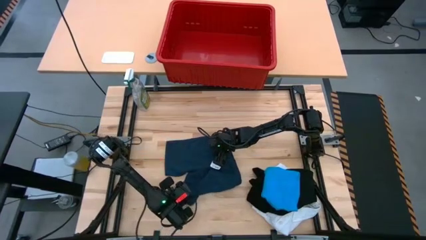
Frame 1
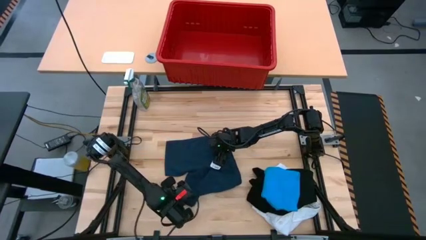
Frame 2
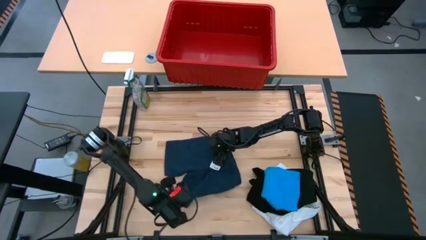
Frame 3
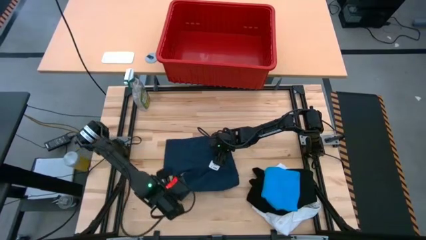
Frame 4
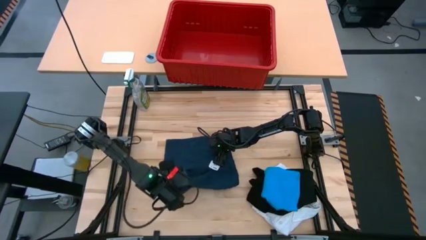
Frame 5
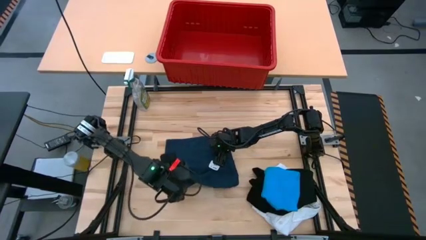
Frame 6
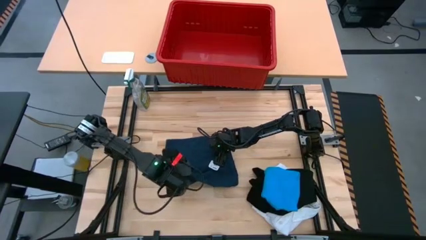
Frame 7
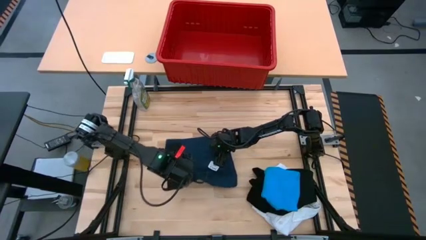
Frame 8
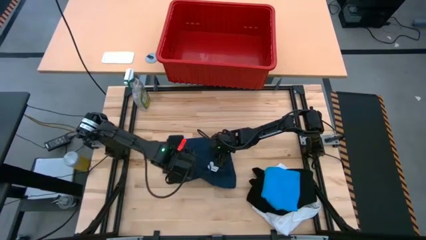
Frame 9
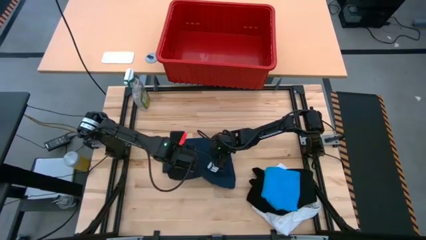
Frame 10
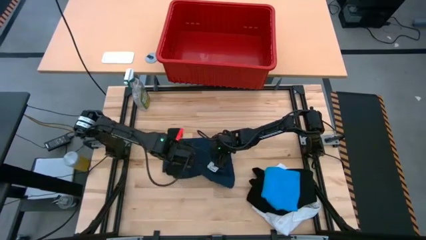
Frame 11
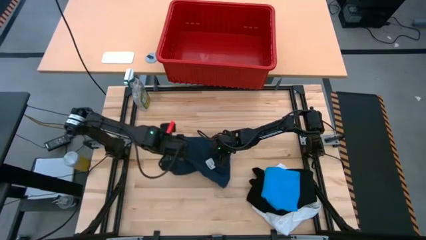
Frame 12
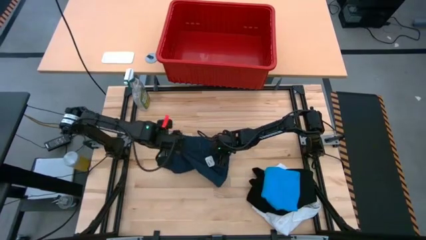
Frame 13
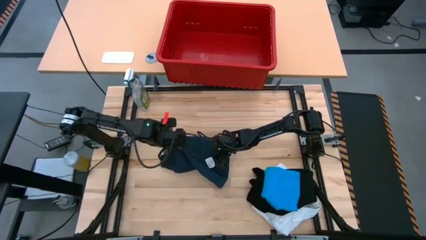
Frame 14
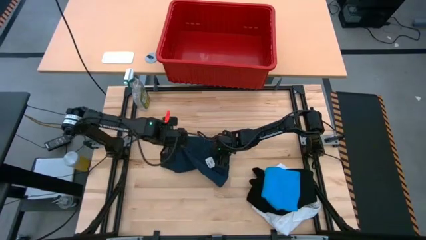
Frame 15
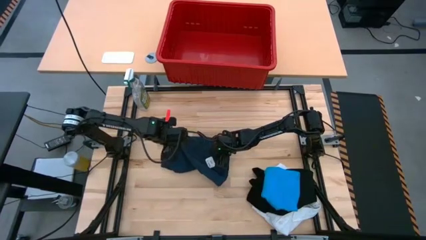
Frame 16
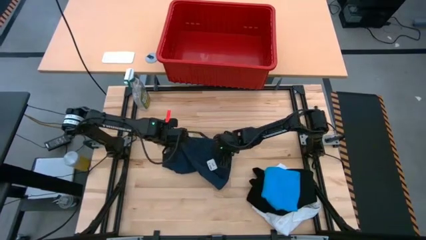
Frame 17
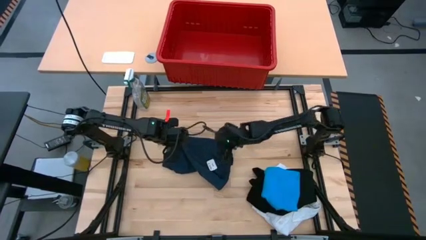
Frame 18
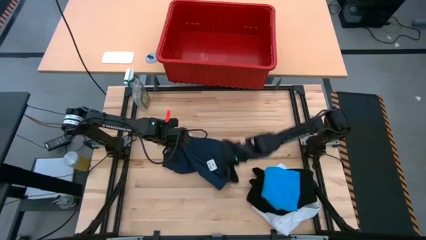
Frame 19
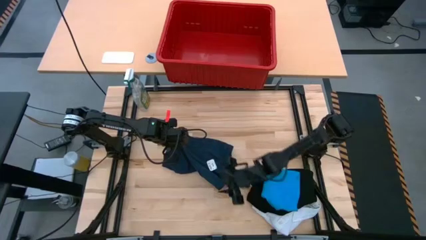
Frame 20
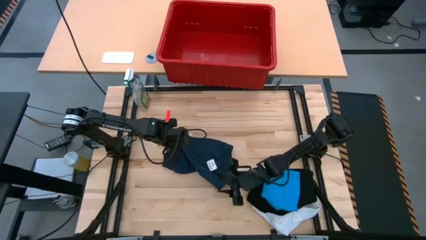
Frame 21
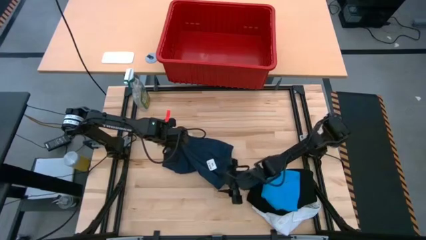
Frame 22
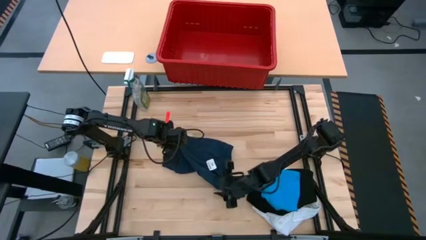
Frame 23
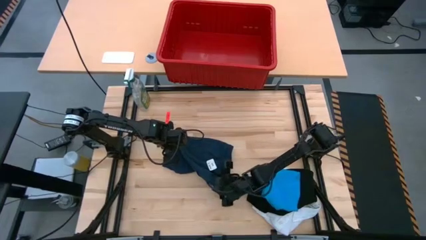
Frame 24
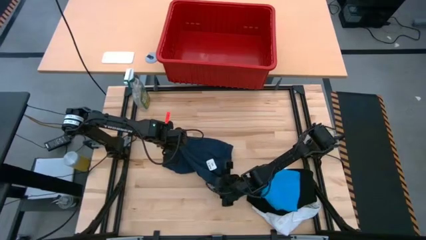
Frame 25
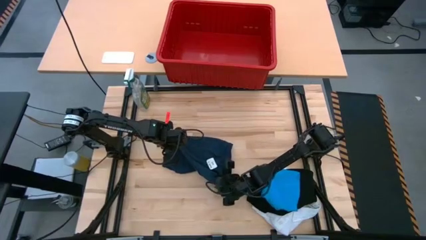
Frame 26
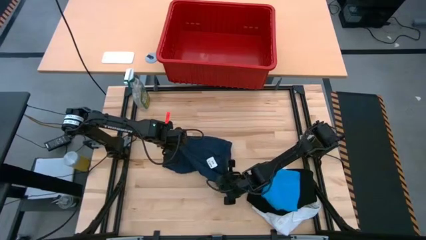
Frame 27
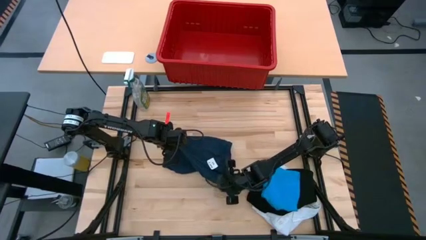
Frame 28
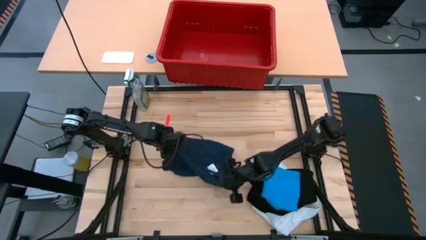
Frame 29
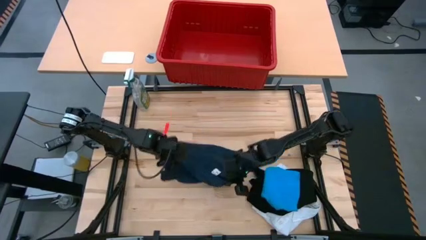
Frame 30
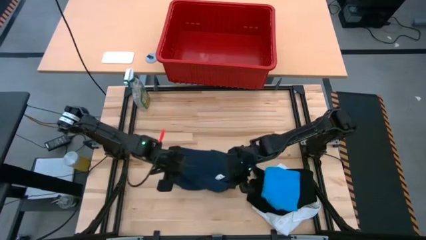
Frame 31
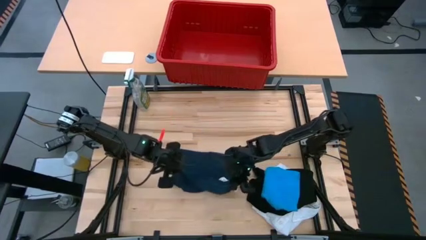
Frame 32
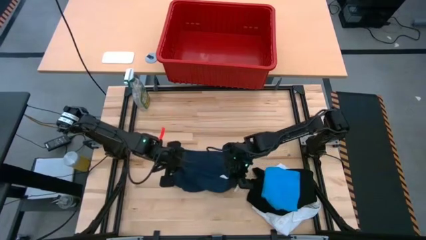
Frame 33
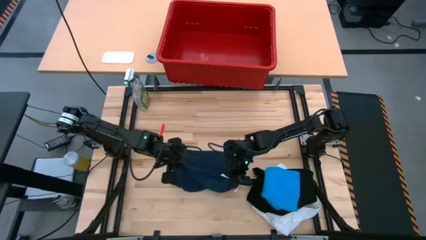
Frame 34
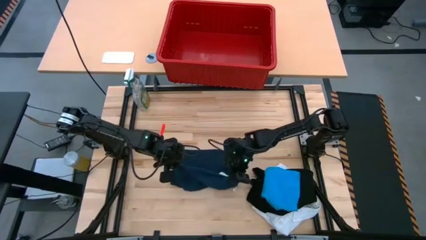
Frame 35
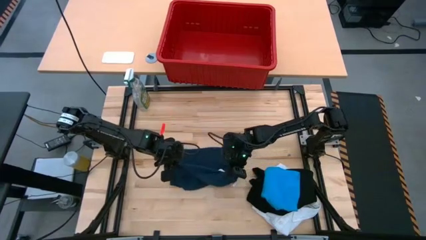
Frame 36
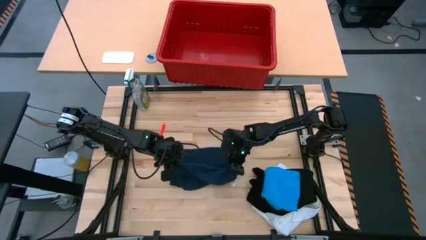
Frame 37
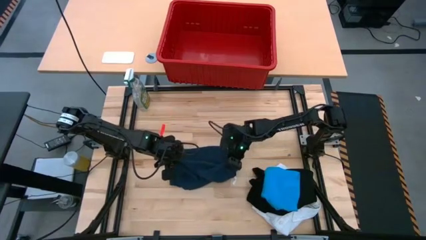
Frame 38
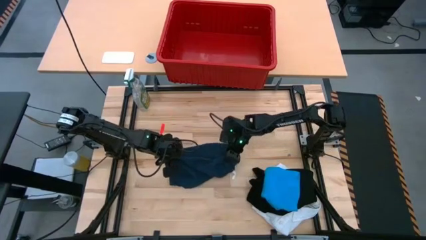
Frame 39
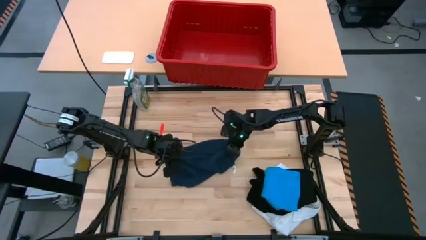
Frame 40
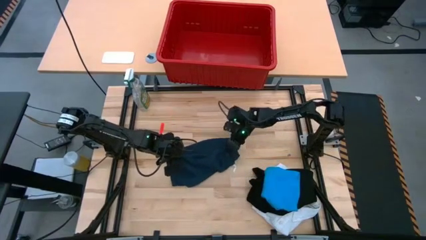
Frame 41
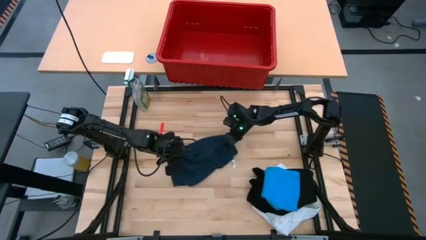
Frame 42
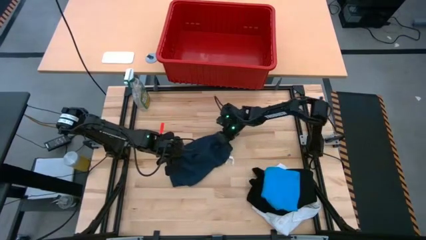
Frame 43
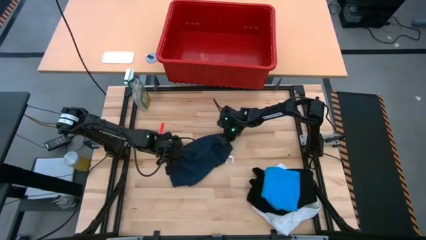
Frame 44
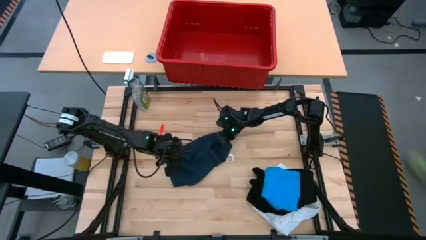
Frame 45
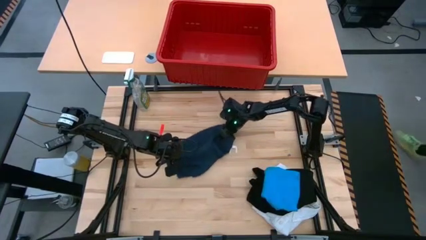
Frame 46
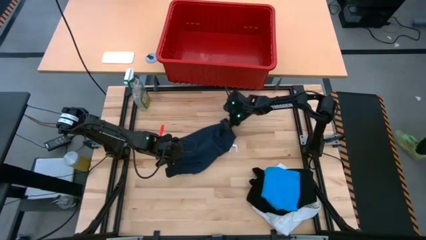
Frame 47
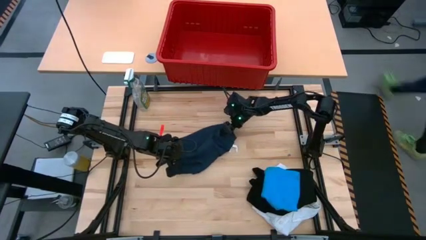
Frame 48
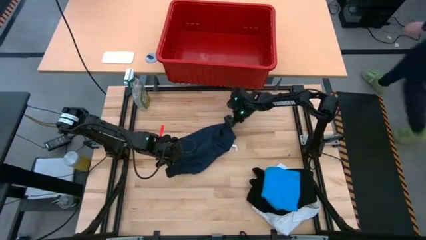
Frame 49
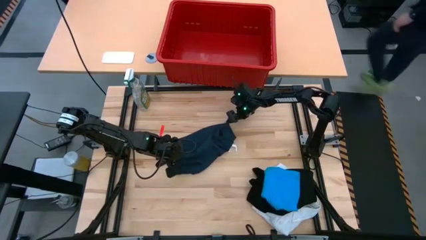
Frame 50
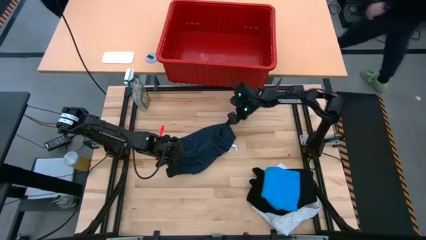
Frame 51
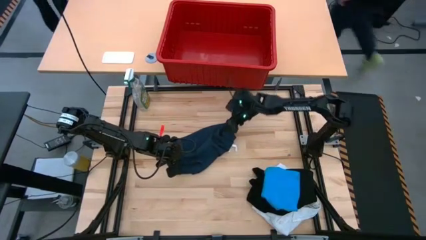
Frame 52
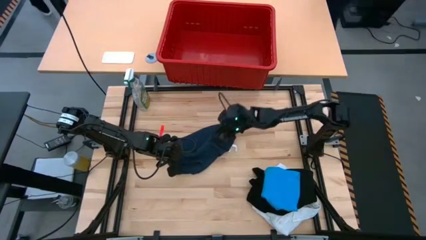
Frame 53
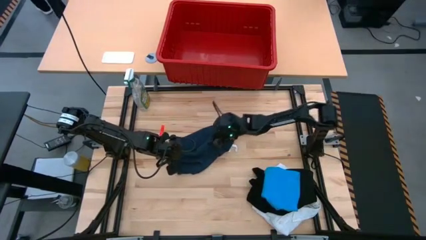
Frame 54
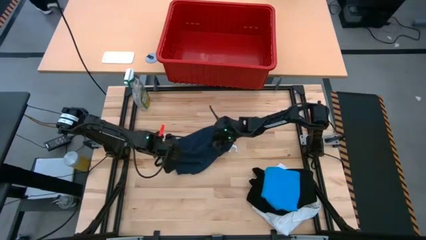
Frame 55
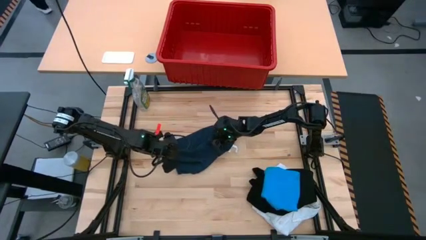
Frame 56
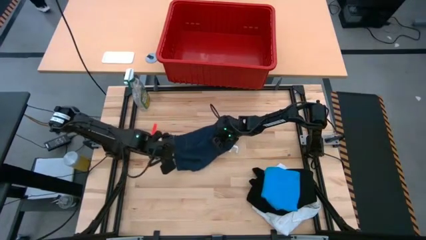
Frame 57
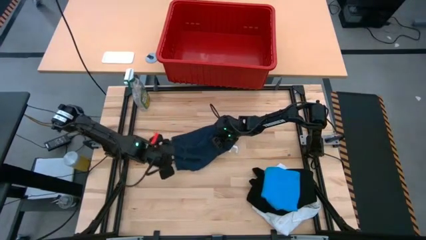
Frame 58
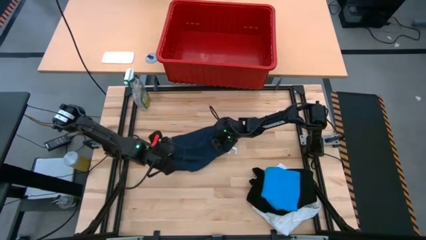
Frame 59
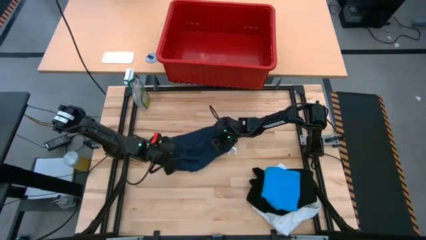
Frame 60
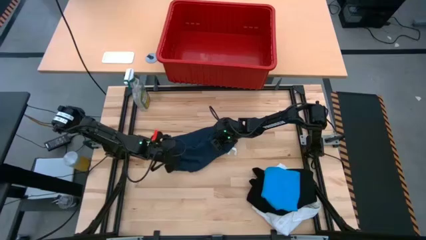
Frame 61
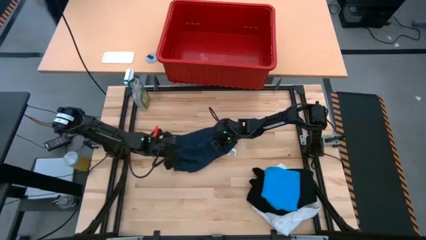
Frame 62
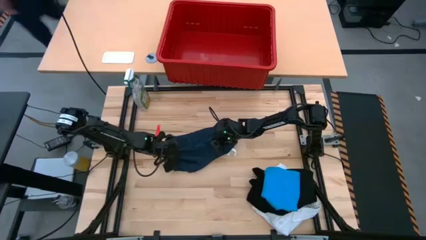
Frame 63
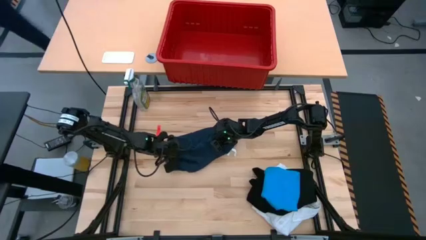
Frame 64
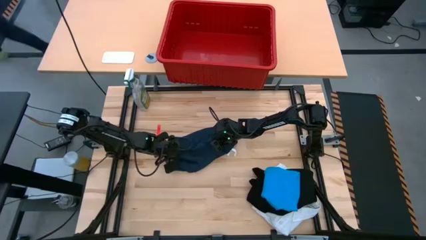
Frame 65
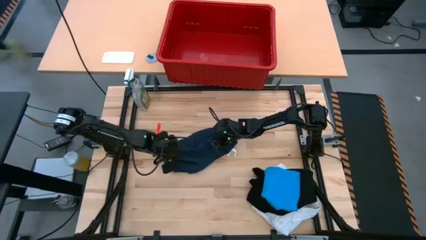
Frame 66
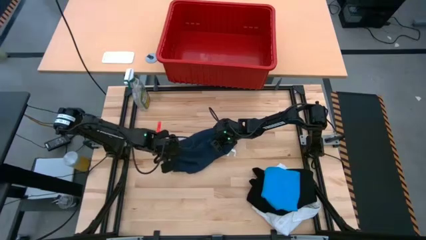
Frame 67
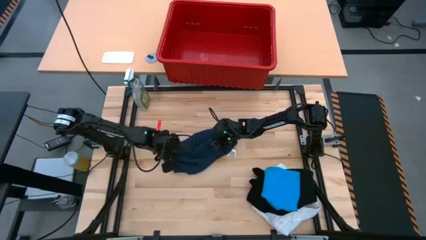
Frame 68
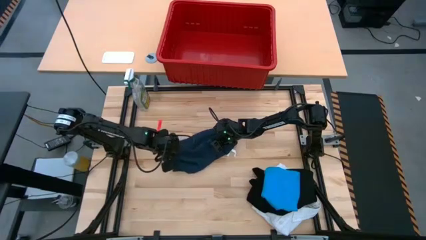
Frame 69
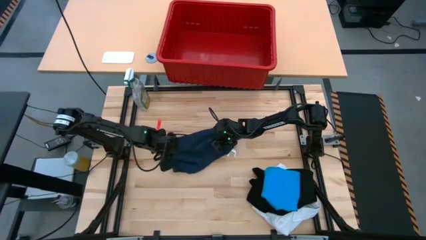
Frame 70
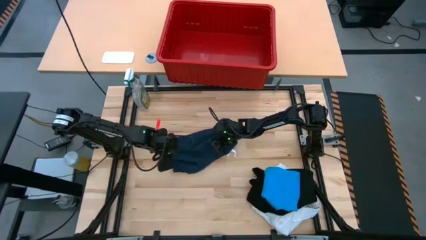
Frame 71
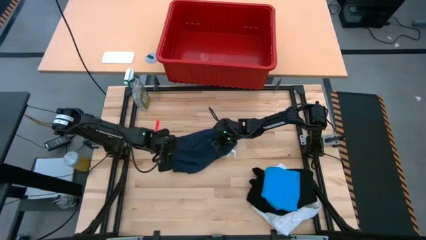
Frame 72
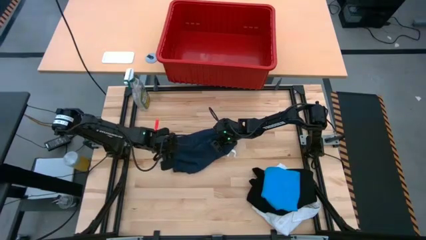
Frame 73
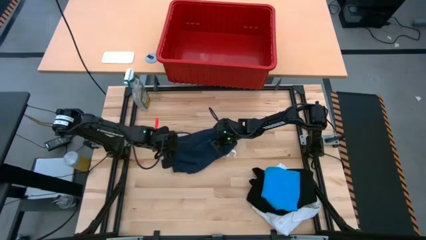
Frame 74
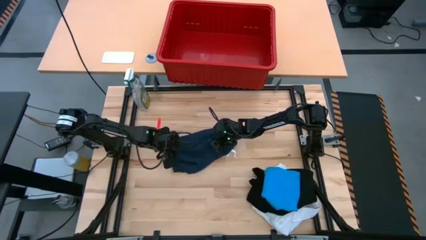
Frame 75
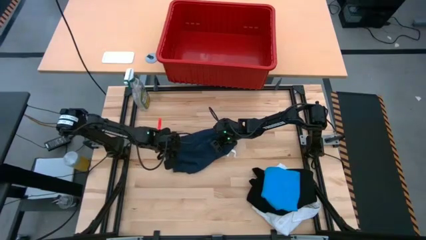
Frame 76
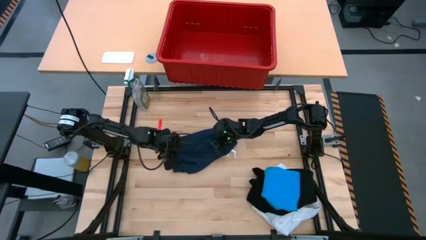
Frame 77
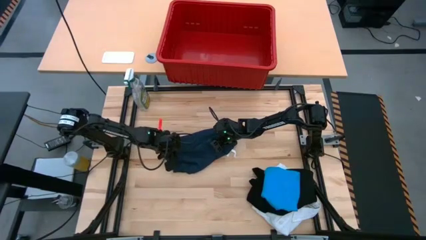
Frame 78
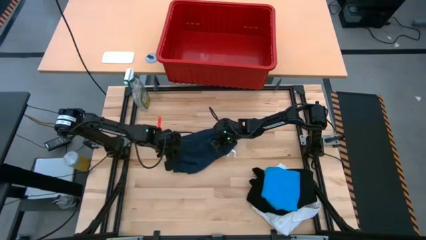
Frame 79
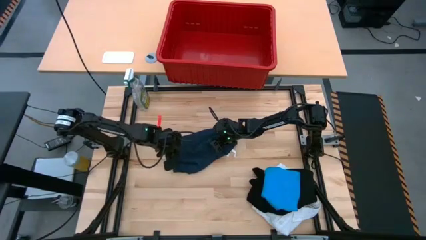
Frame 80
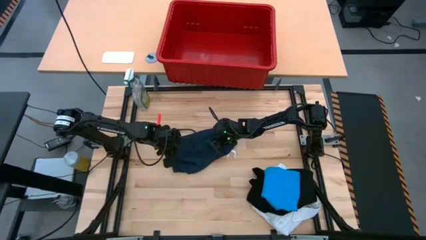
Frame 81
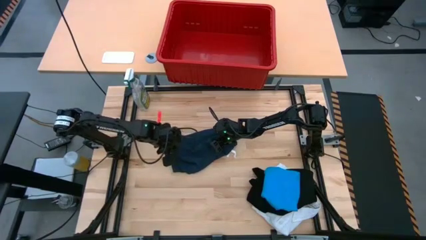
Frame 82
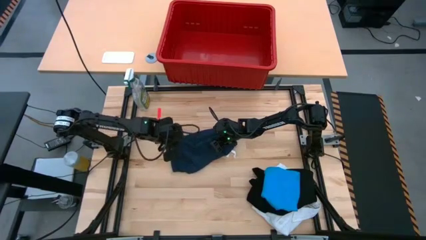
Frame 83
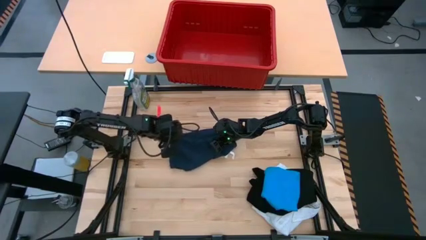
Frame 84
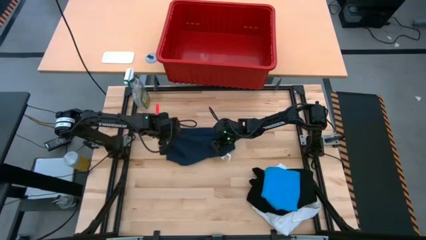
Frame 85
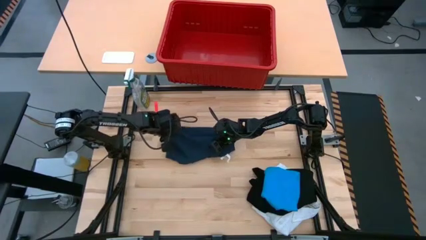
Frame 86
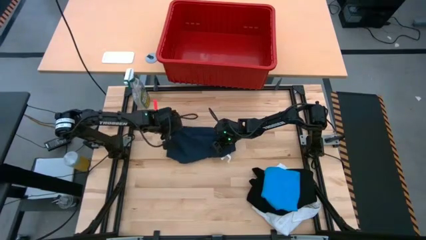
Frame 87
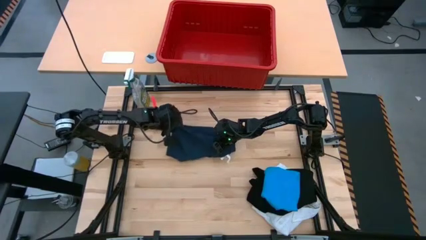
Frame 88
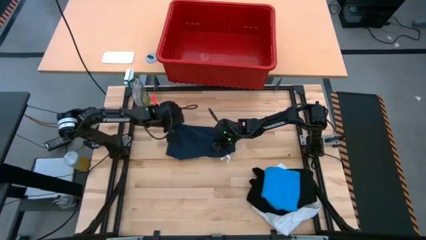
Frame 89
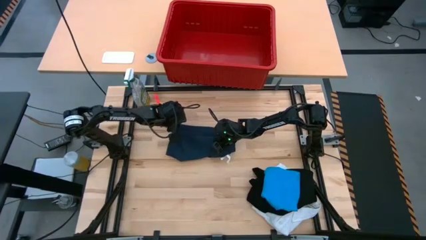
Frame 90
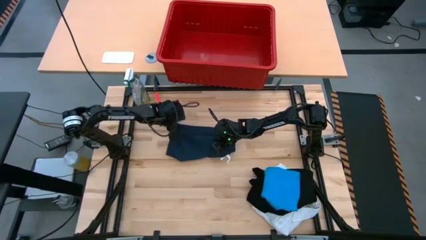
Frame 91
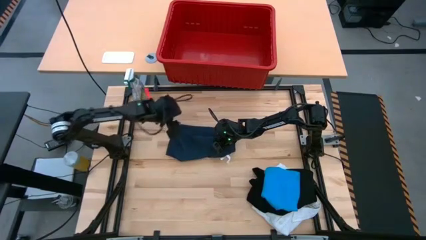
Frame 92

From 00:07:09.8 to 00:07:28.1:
Task: Fold laundry
Fold the dark blue shorts
